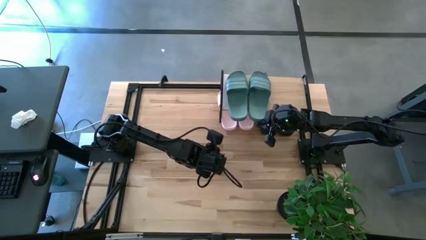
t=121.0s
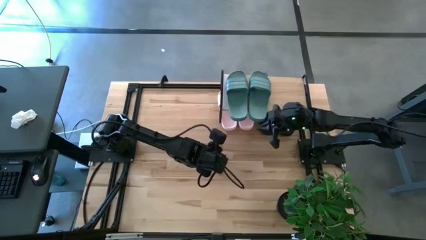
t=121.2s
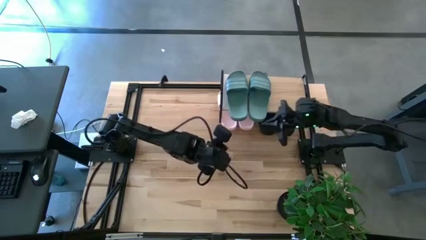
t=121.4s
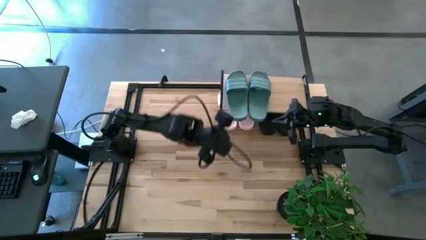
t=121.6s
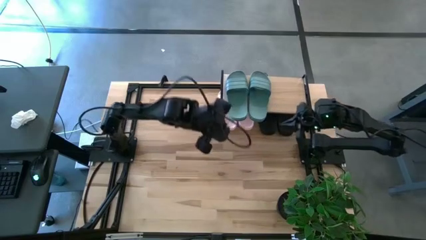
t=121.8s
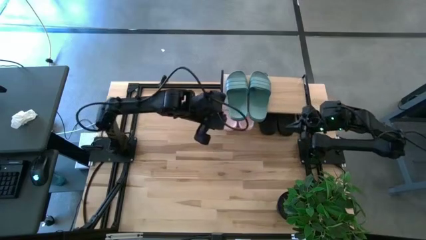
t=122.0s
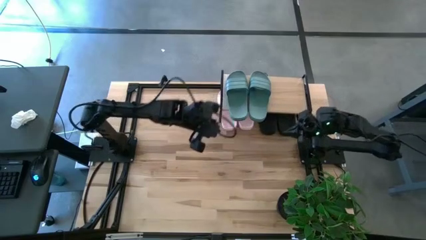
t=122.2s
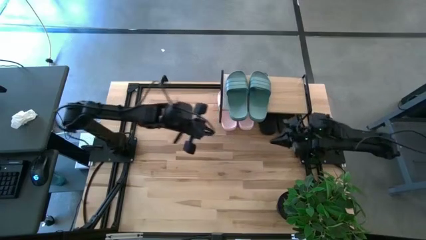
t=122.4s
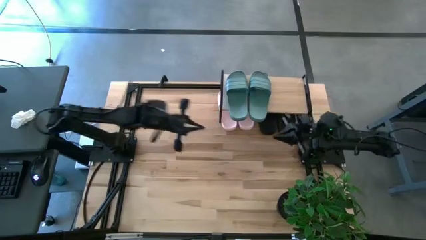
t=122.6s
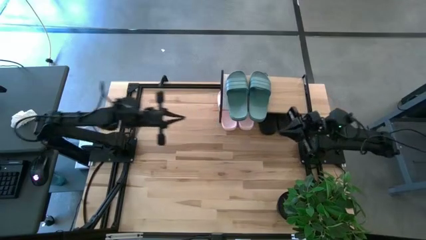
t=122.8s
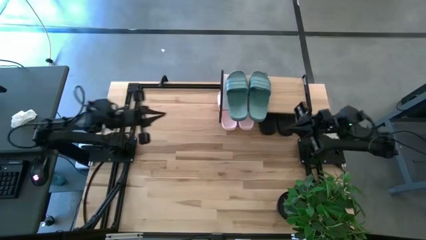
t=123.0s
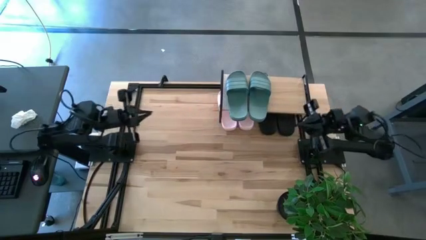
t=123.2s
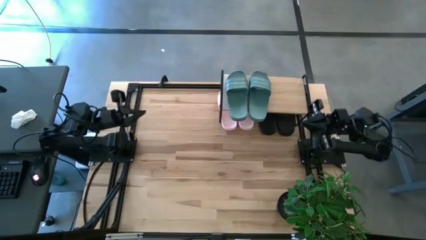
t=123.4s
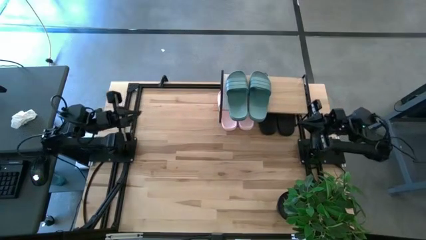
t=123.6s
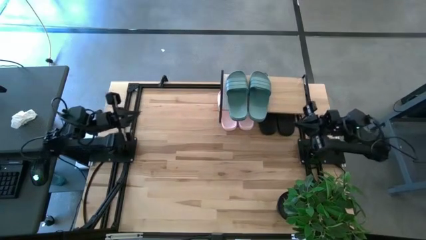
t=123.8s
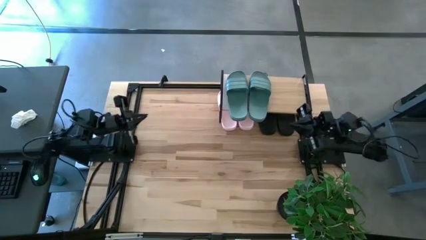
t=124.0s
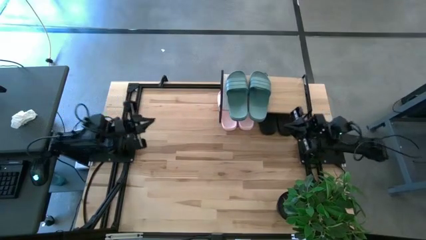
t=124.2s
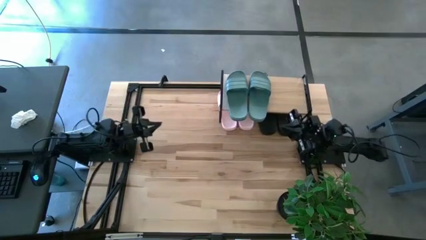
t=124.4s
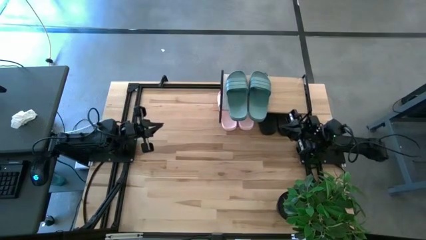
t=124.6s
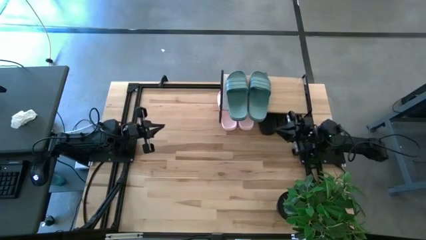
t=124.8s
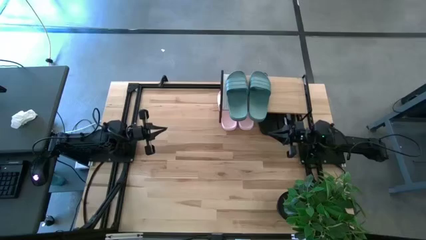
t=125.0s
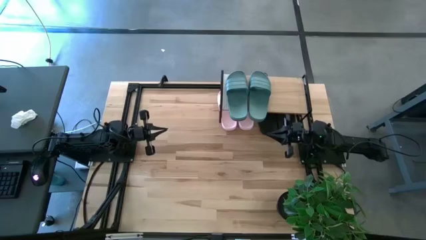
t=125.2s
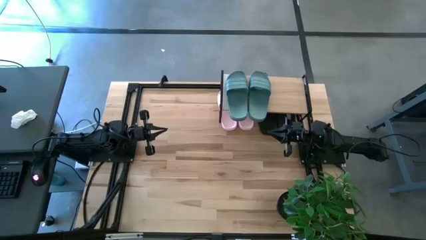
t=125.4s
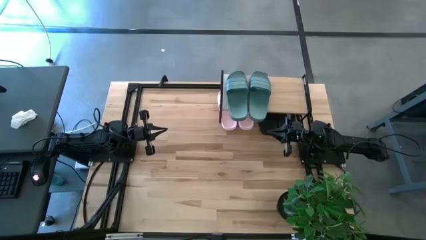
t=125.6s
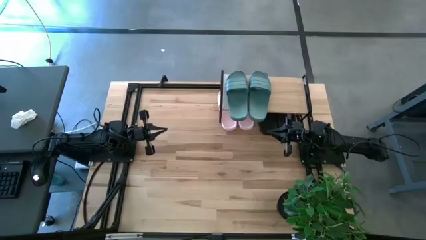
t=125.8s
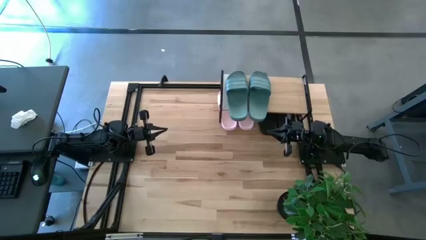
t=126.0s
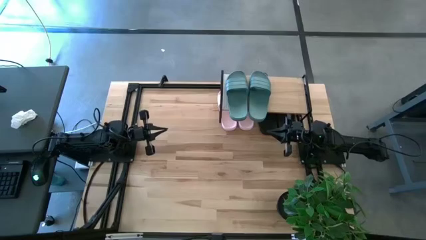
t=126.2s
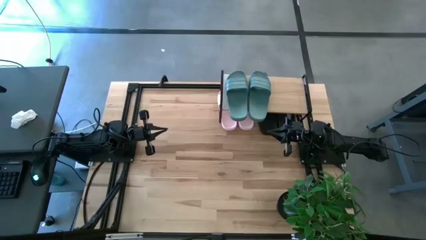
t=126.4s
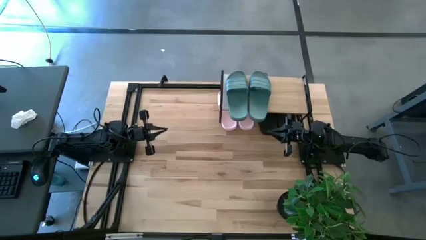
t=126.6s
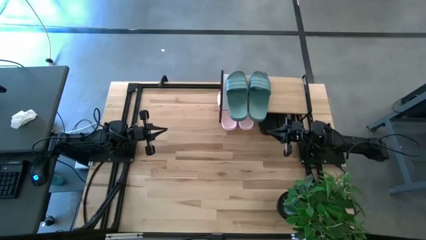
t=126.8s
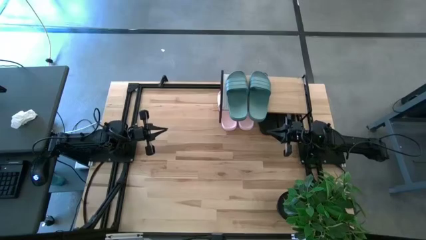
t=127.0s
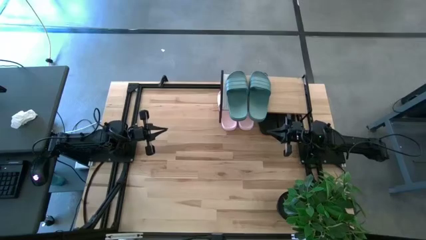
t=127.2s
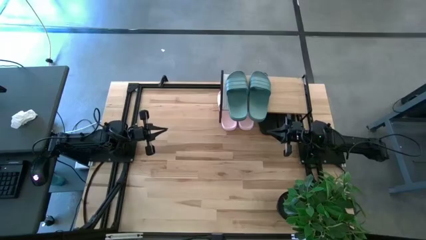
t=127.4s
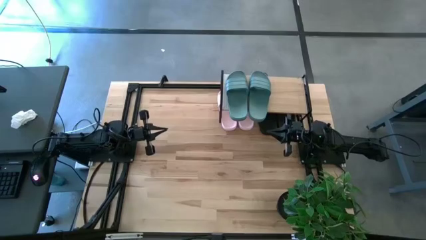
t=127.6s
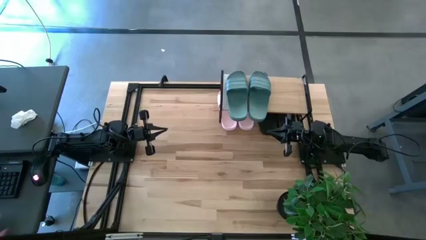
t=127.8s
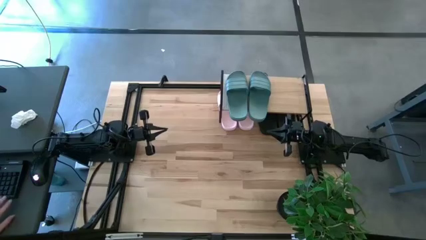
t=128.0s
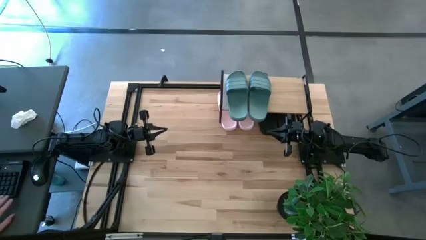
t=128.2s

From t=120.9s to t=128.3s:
Task: Pick and place slides into the shelf
Return to Home Position

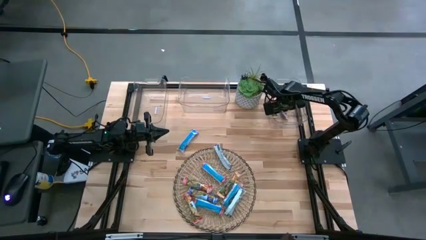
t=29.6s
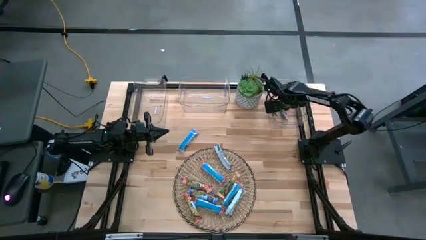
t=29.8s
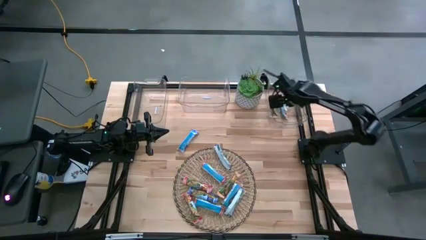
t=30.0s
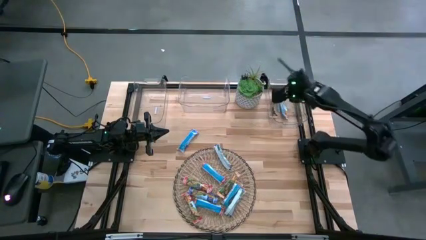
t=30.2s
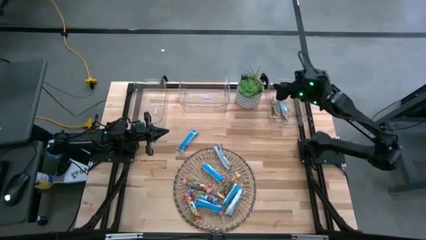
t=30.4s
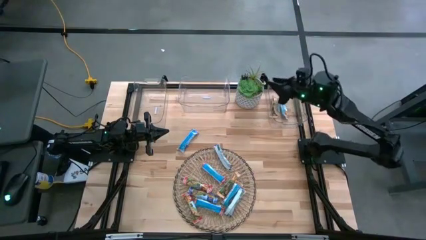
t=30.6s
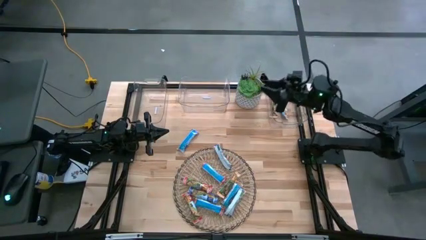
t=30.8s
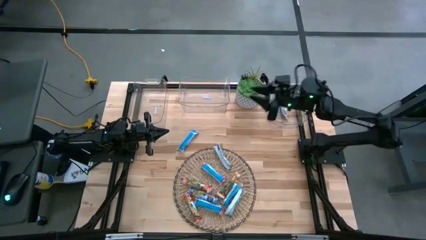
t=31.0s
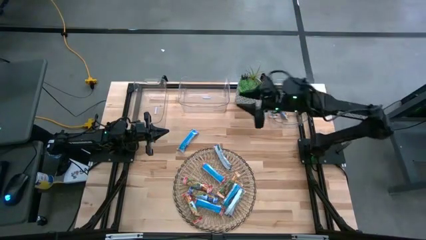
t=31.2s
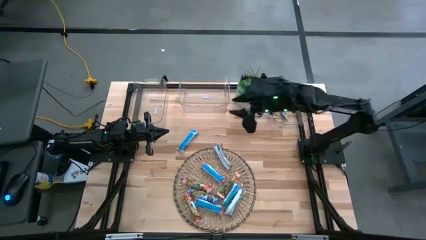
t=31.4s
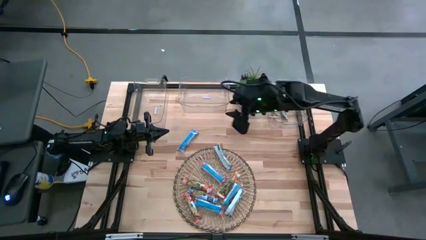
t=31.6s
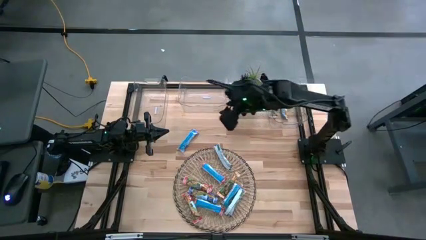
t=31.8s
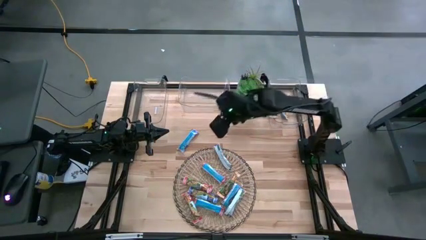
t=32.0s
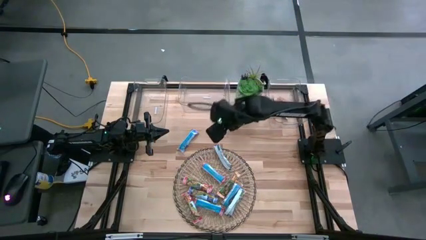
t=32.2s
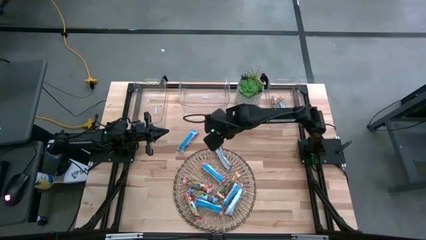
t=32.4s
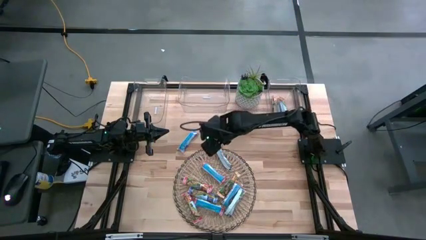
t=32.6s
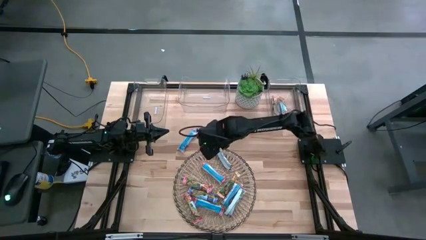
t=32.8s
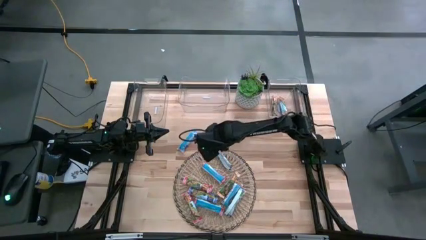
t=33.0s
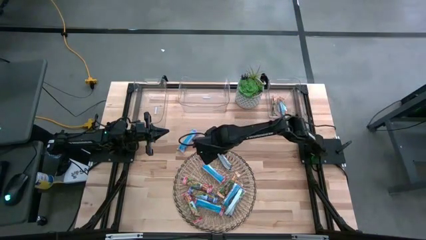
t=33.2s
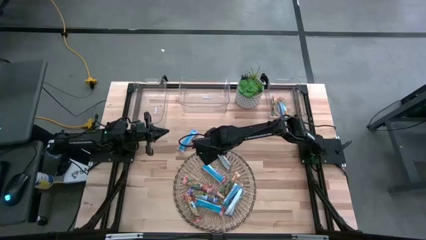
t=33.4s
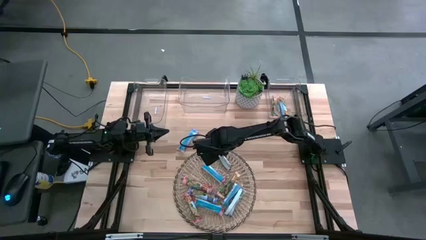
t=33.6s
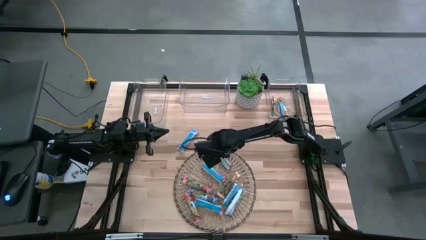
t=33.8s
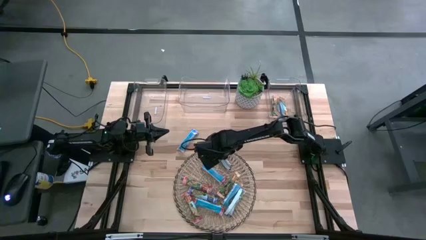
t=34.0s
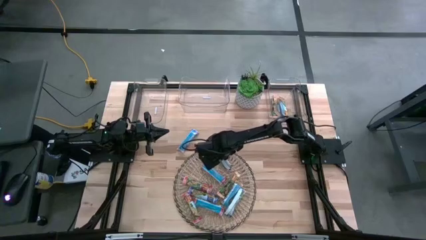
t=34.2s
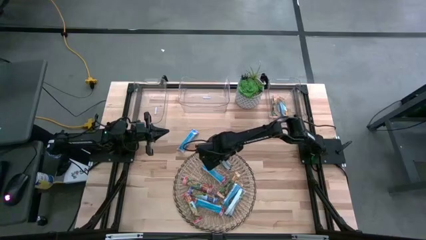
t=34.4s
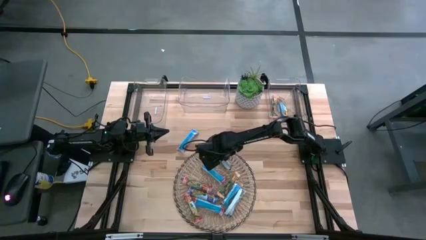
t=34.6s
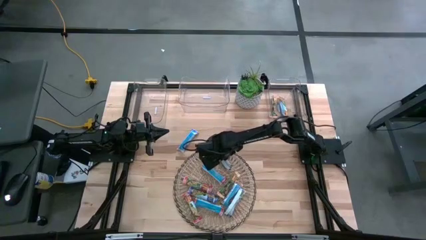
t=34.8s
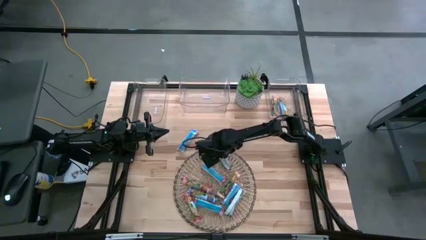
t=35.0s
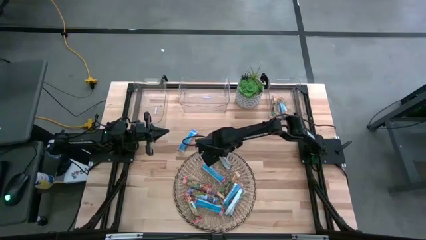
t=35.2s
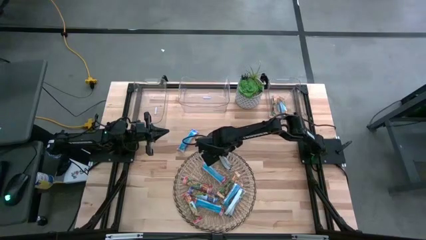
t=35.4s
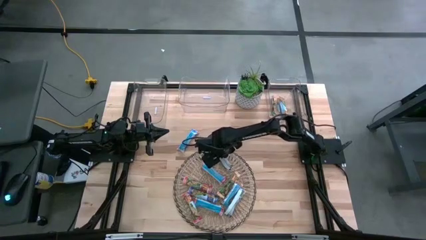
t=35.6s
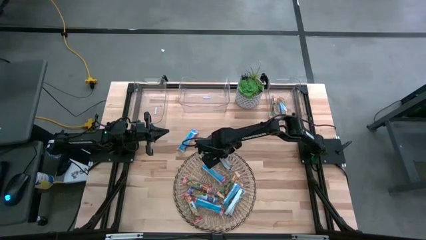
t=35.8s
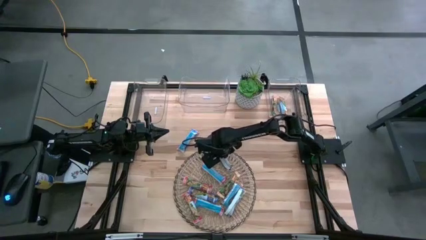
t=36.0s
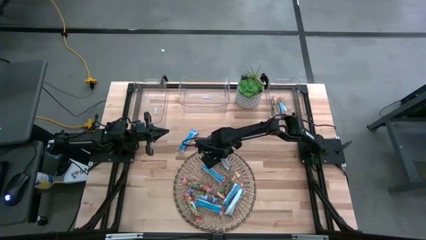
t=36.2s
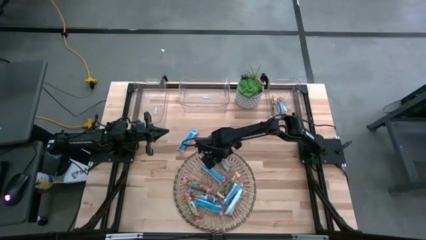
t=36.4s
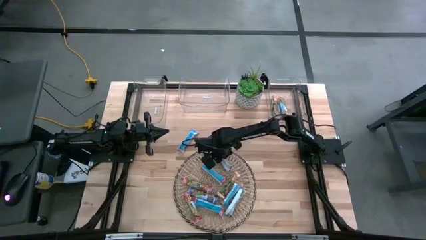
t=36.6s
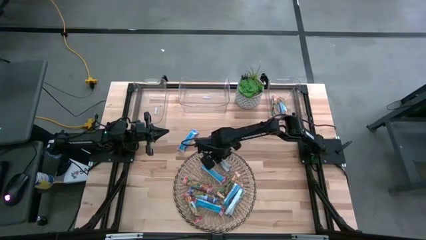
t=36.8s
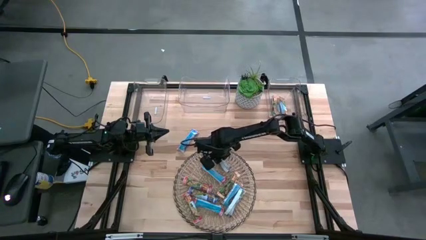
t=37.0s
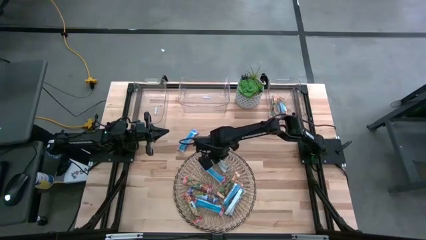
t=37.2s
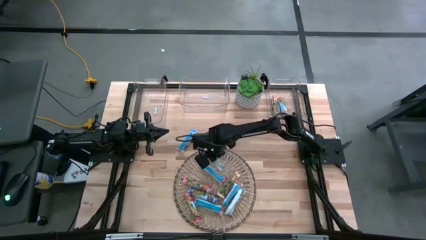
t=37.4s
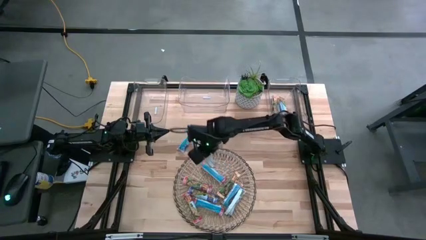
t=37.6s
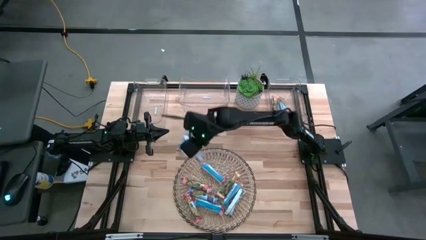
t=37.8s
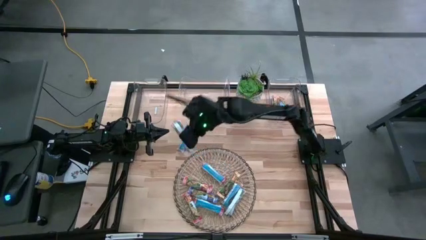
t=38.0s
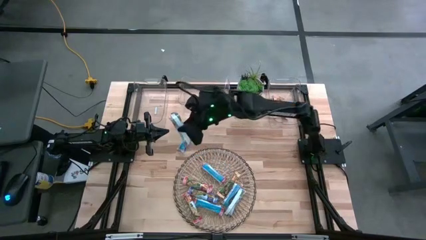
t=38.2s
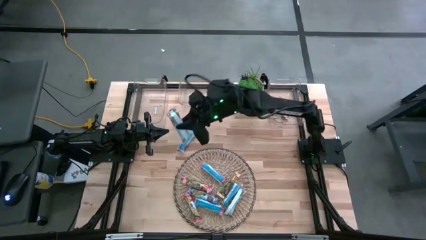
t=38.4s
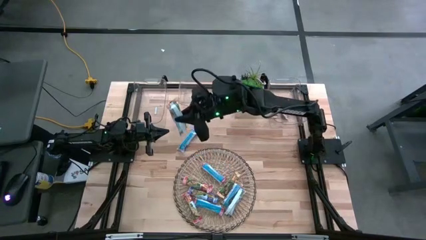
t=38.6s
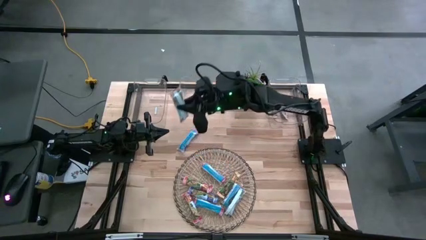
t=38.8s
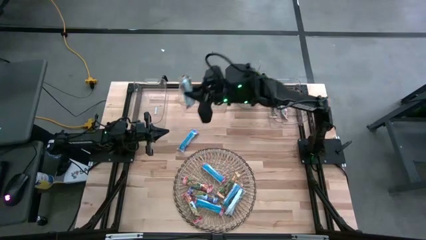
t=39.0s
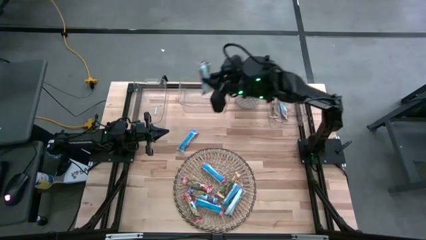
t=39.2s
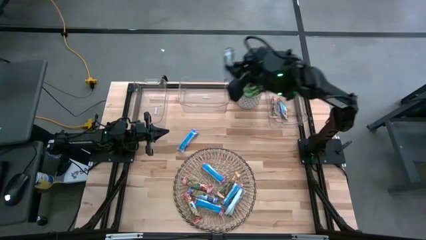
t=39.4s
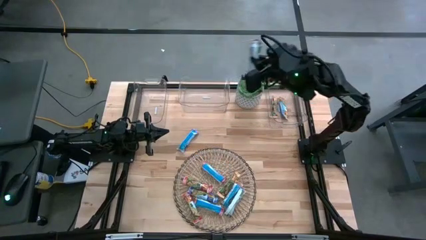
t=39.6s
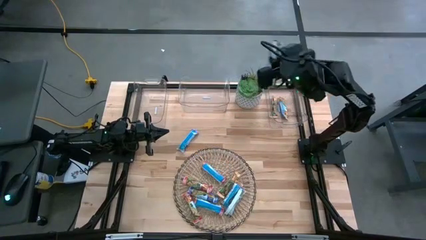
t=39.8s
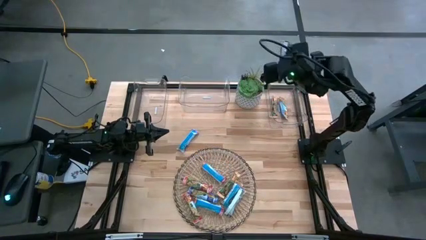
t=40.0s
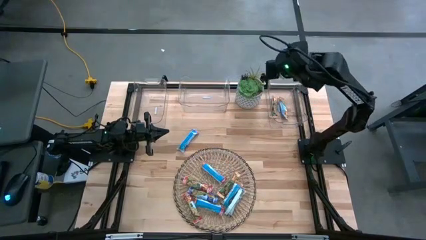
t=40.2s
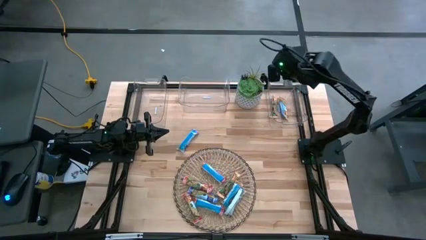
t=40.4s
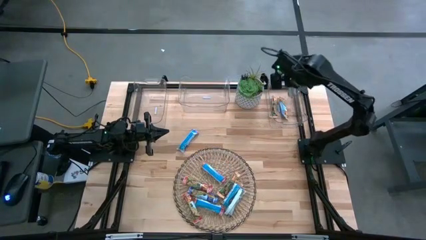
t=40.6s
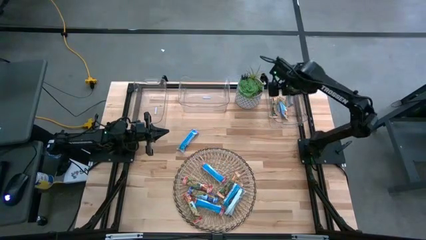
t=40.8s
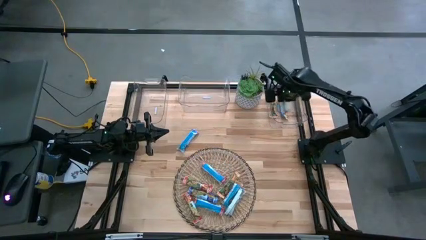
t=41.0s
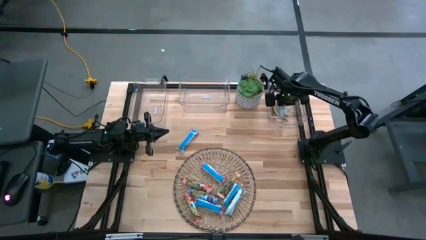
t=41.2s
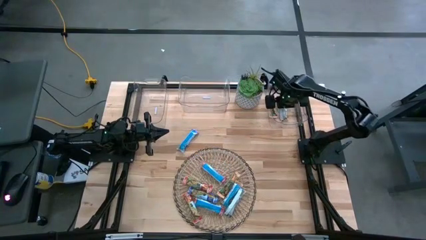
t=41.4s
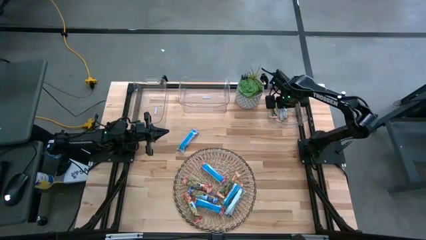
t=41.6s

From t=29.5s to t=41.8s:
Task: Pick and place Granola Bars by type
Put the yellow granola bar into the right transparent bin
